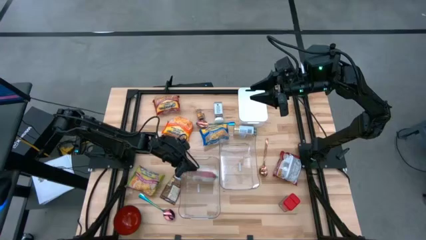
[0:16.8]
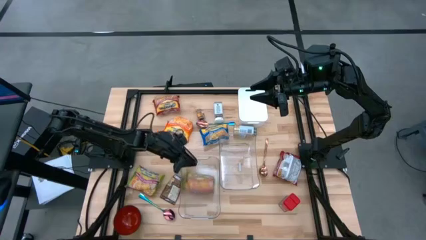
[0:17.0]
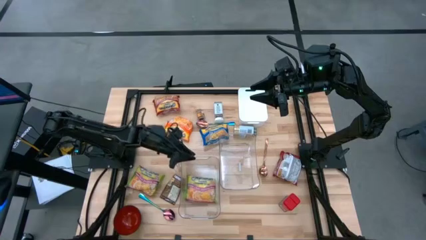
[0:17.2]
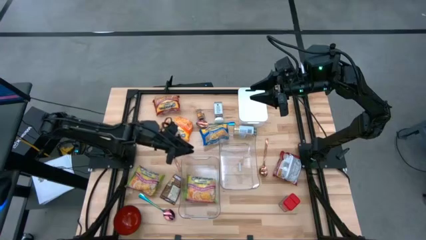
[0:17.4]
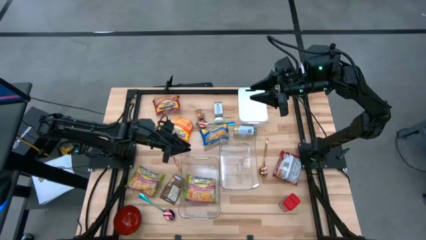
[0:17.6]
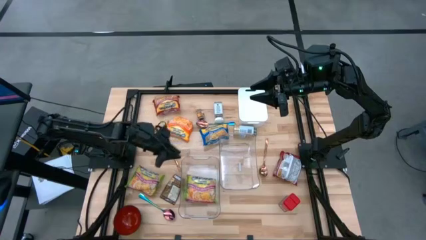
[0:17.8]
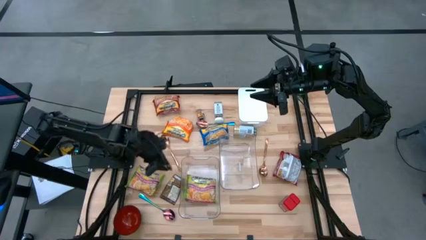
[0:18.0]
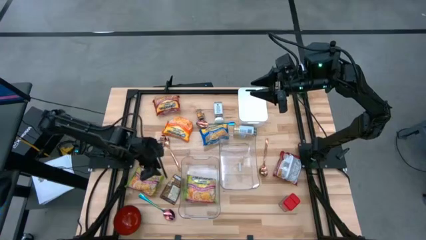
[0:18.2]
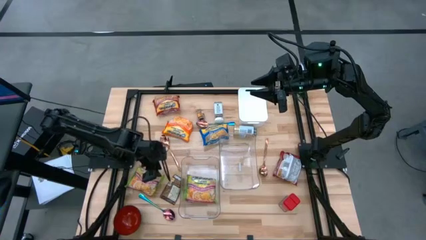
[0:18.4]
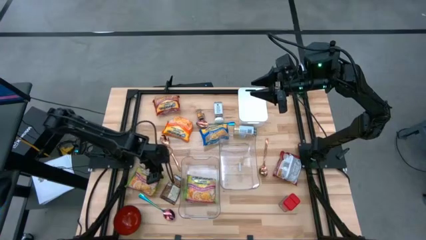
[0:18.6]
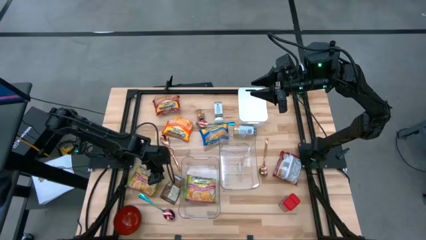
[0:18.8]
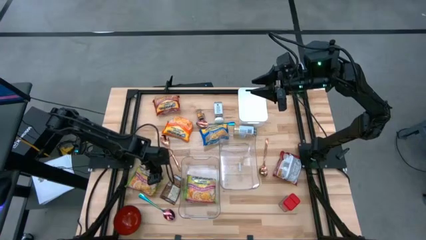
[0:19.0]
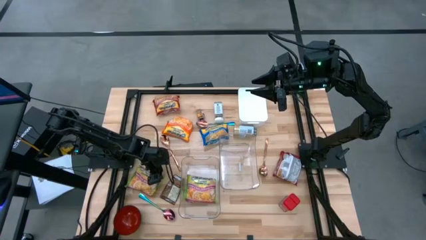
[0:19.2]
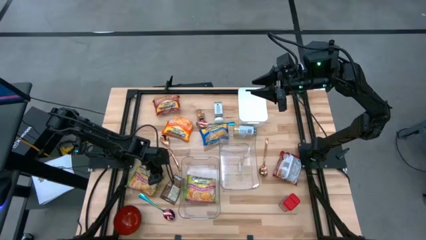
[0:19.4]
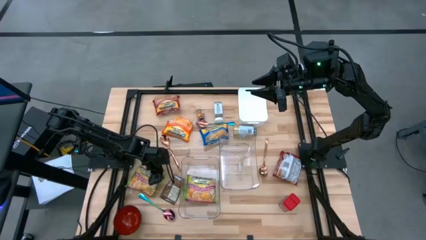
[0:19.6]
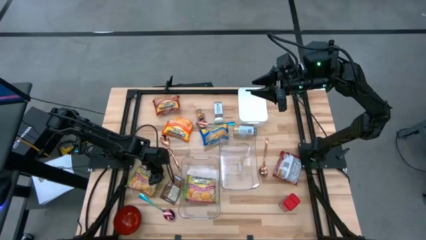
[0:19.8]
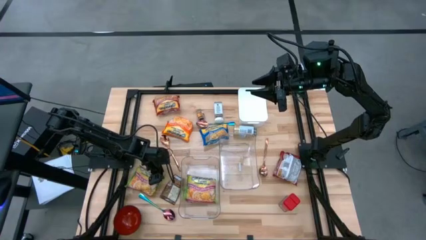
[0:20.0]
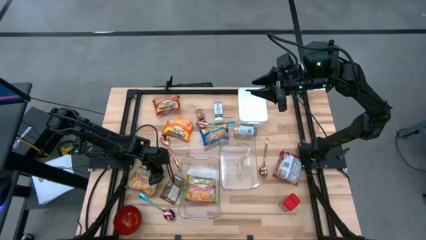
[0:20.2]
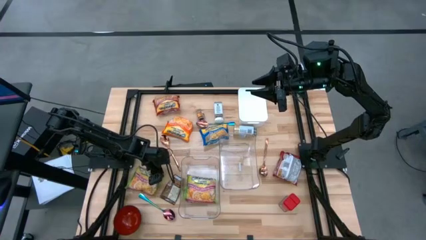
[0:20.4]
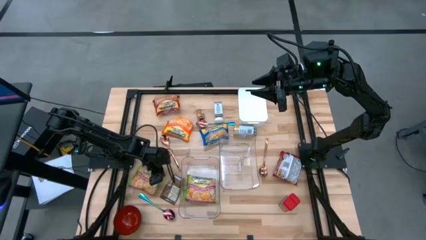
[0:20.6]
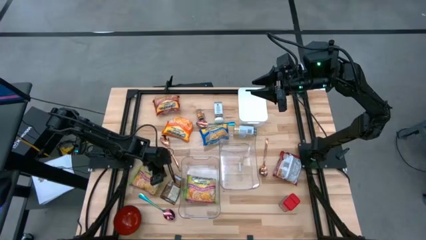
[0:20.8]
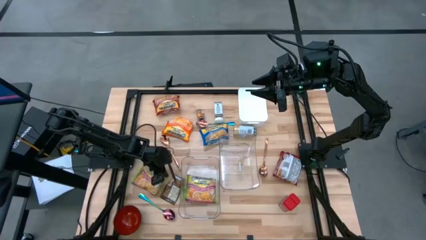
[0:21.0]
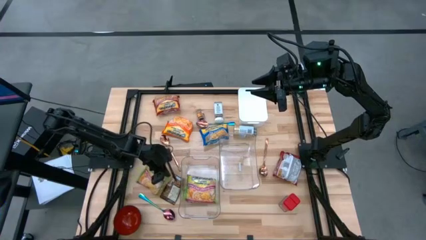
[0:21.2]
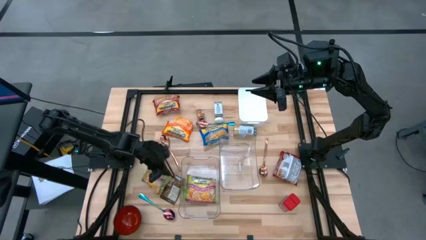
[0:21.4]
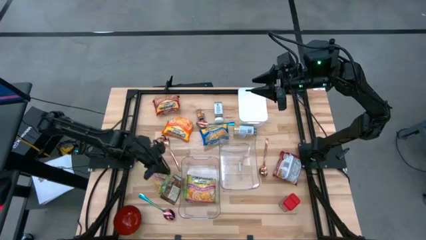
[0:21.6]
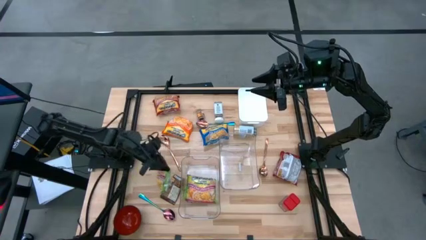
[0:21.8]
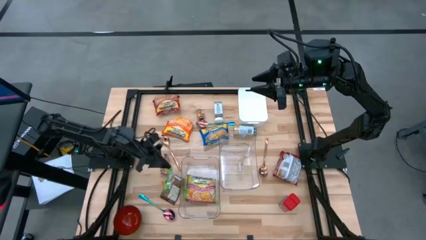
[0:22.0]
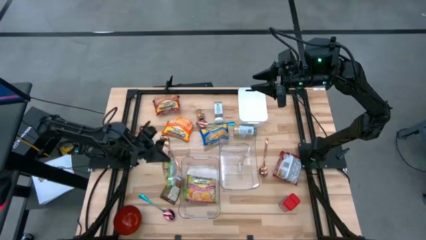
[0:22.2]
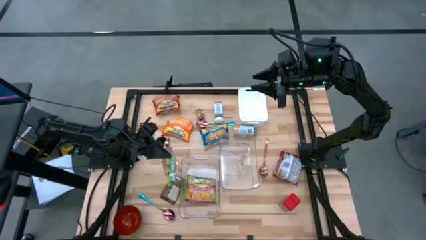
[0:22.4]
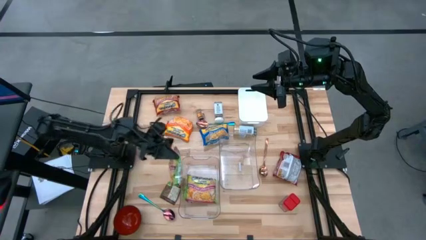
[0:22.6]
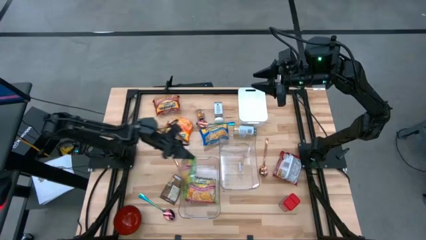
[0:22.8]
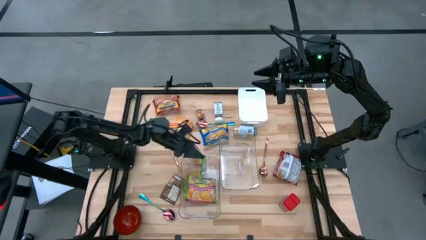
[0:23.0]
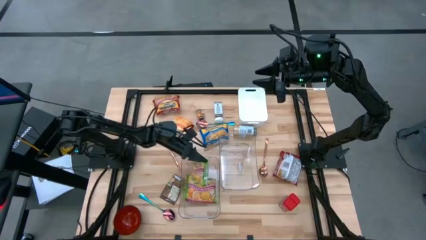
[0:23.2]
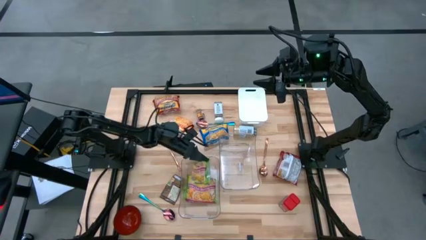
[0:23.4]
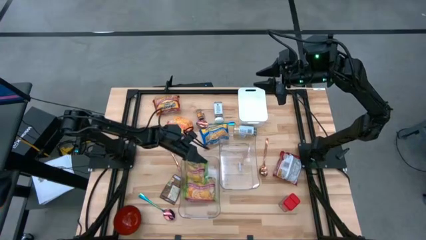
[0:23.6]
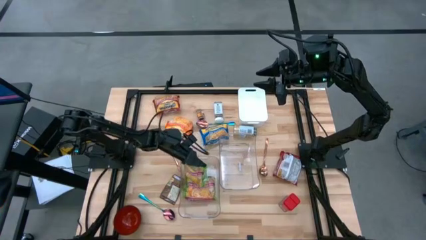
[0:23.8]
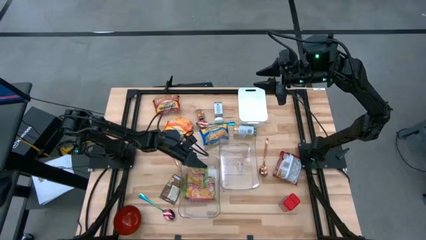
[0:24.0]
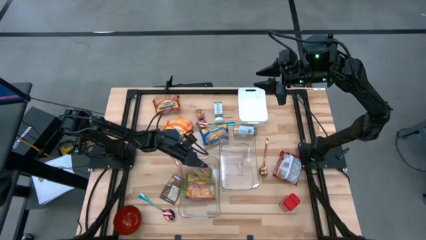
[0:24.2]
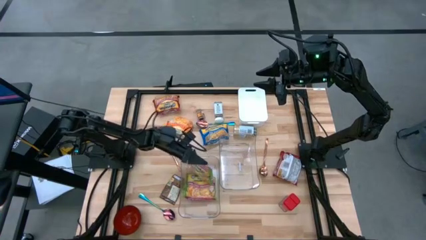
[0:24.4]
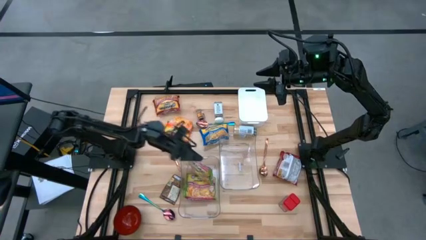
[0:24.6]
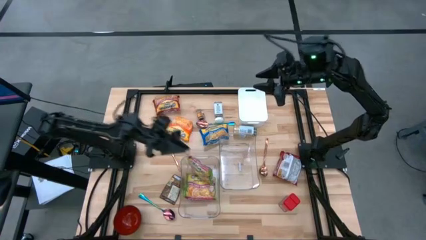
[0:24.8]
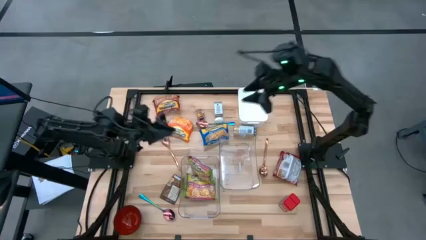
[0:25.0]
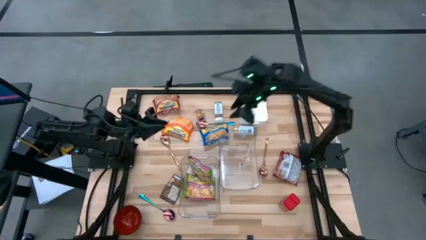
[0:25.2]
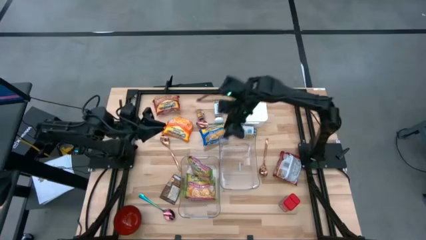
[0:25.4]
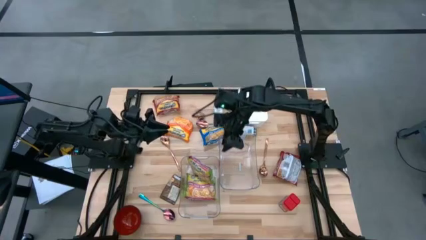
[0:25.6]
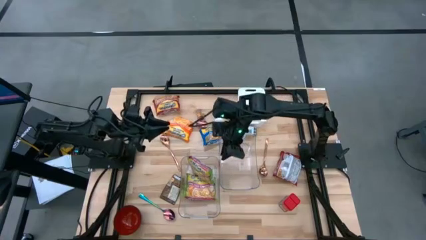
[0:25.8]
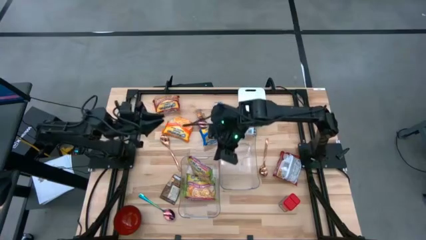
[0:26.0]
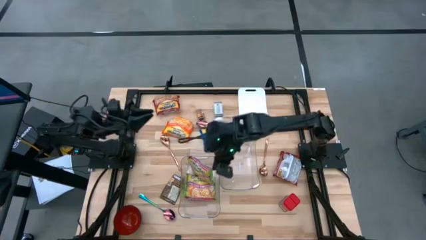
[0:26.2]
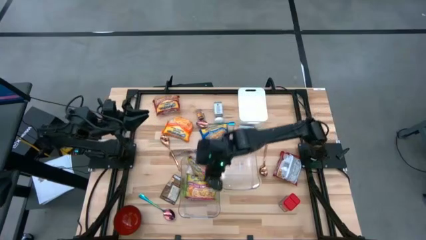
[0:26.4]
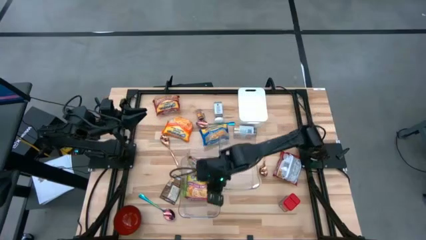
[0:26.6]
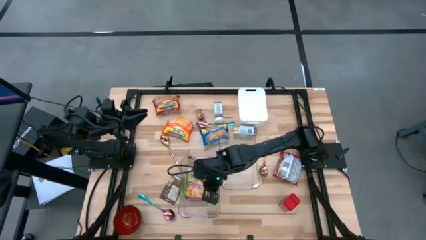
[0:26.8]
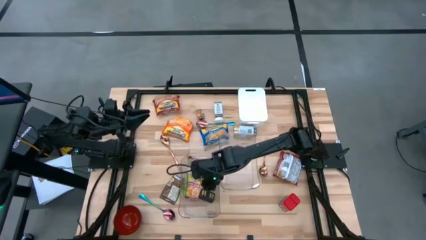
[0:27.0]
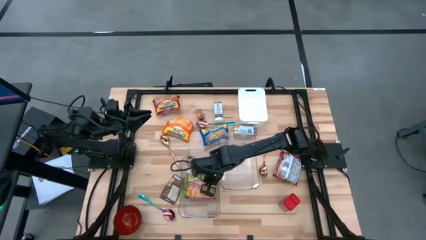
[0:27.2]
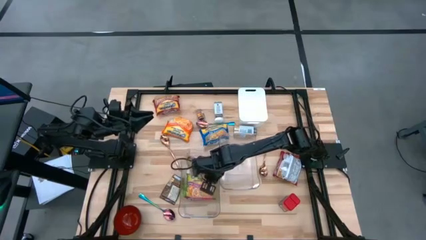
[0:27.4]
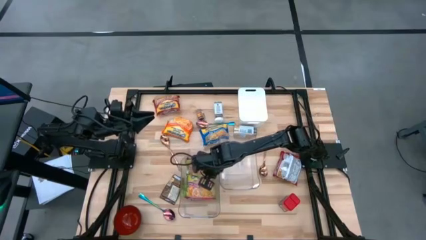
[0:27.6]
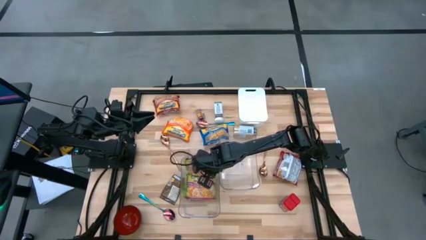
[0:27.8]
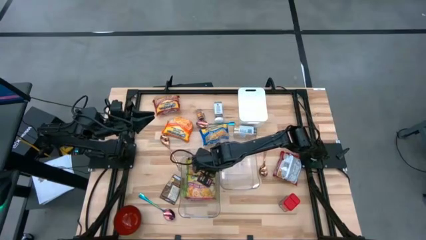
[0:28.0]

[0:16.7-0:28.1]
Task: Pick & Place Food Item
Put the green noodle pack into the left transparent bin

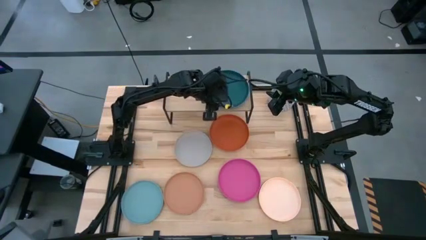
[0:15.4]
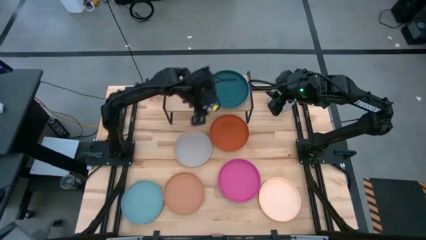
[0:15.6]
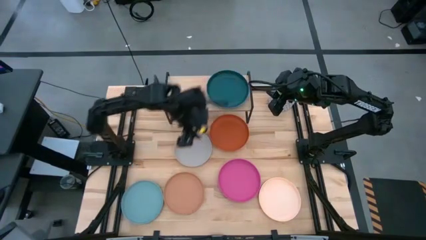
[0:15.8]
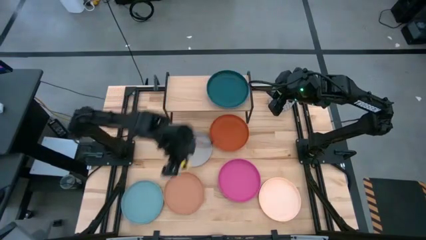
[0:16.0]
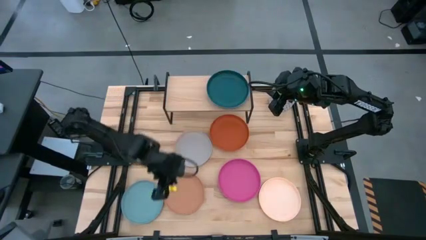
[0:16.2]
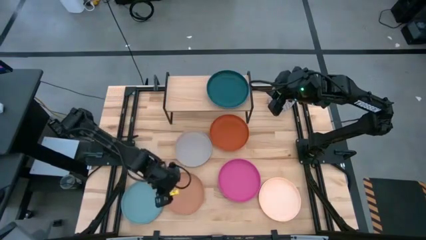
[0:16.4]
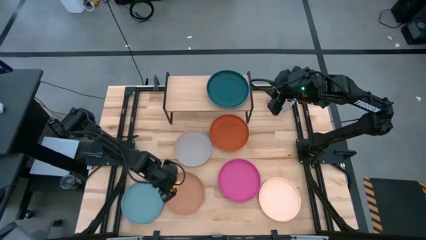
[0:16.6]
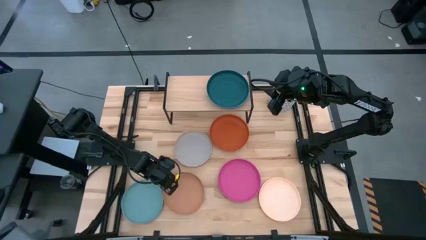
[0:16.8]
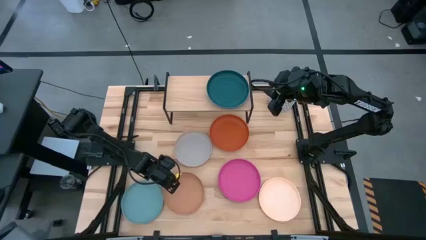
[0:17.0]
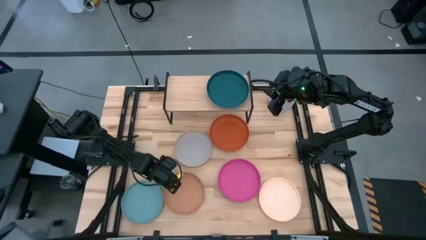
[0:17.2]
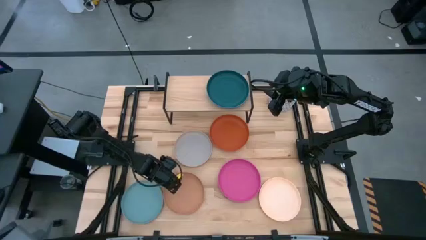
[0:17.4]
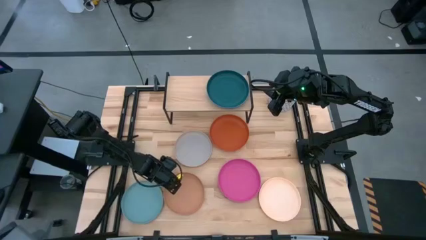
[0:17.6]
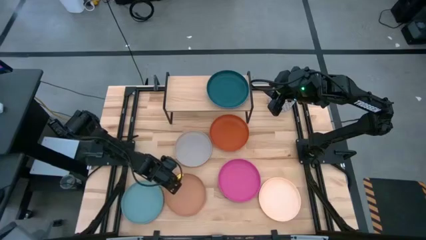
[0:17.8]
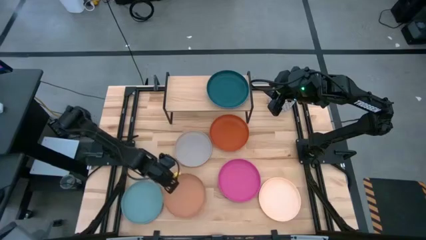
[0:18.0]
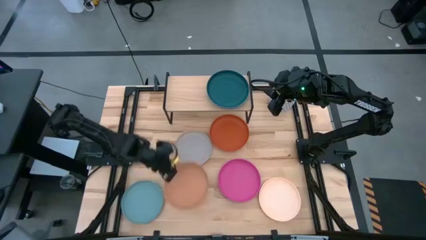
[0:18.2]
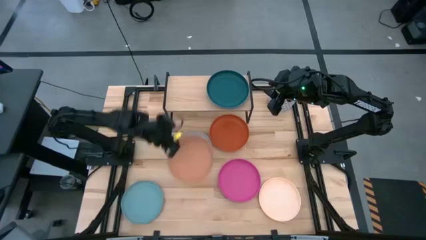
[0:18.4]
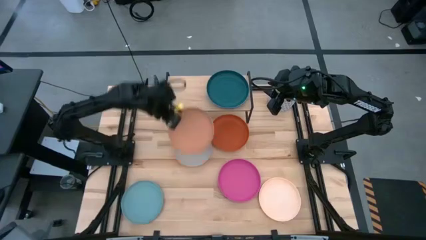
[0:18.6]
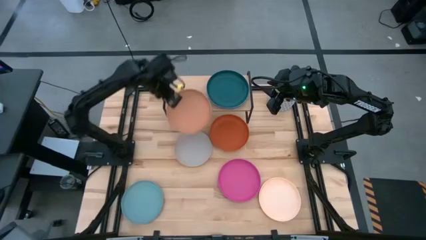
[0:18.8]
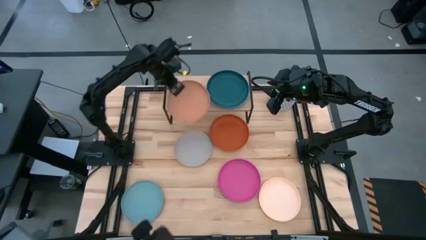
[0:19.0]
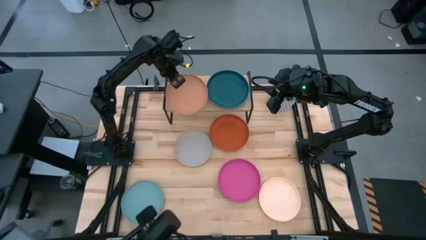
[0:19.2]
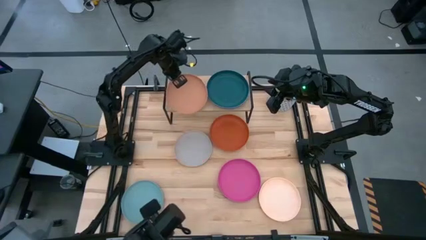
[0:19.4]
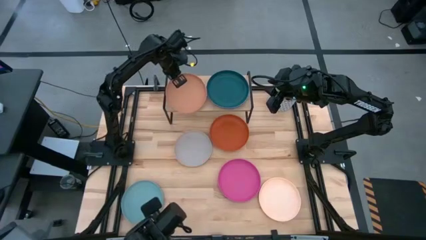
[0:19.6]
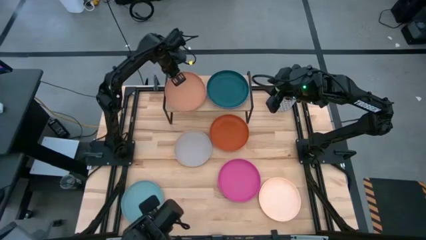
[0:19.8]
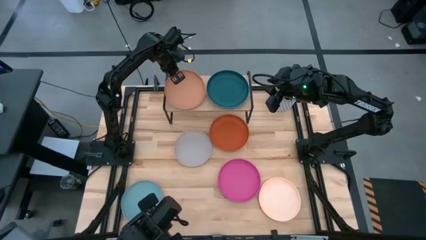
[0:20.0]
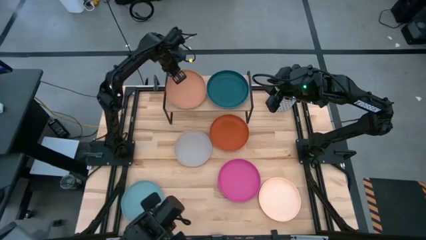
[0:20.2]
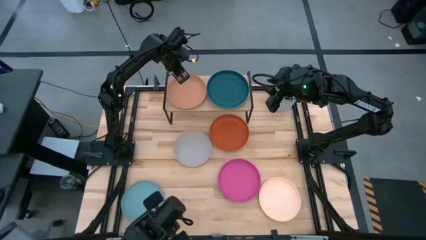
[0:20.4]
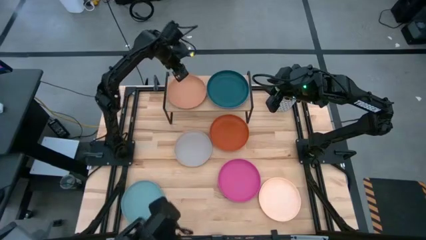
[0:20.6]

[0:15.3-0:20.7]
Task: Place and stack plates onto a shelf
Put the brown plate on the shelf
